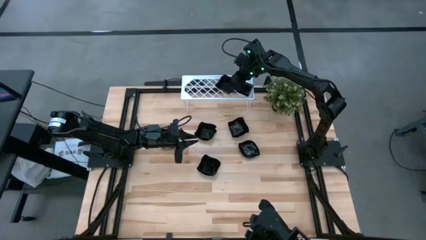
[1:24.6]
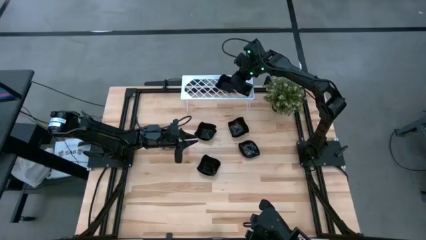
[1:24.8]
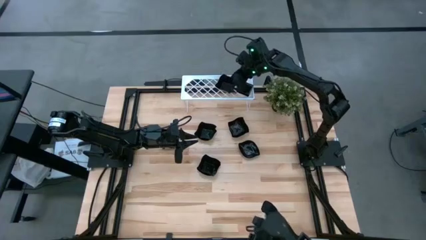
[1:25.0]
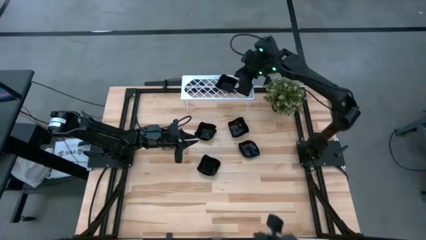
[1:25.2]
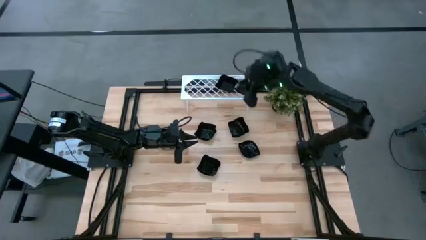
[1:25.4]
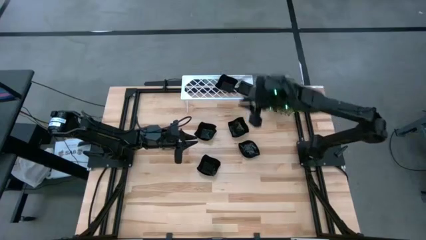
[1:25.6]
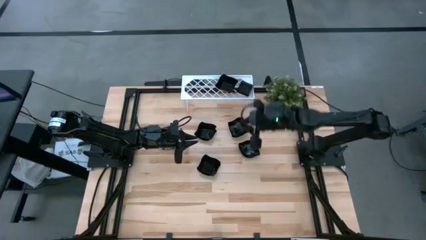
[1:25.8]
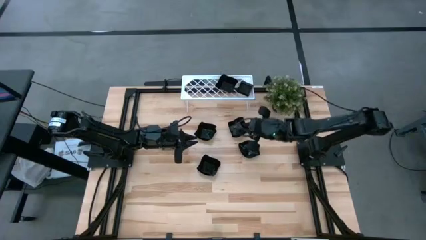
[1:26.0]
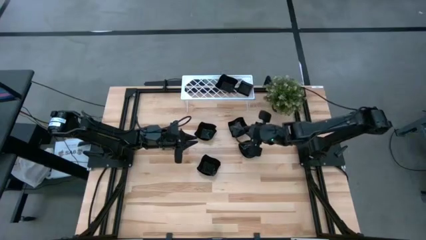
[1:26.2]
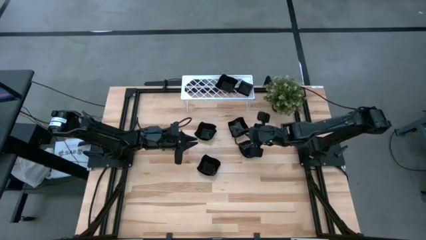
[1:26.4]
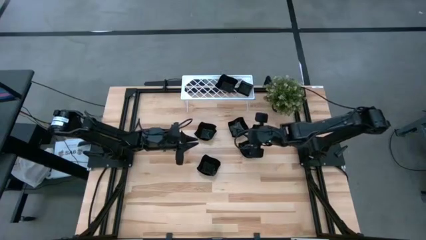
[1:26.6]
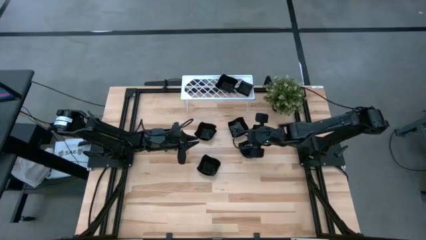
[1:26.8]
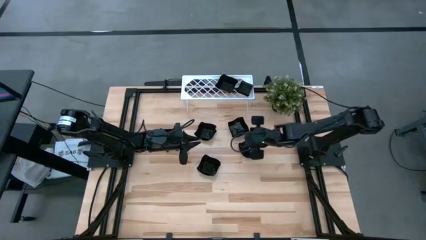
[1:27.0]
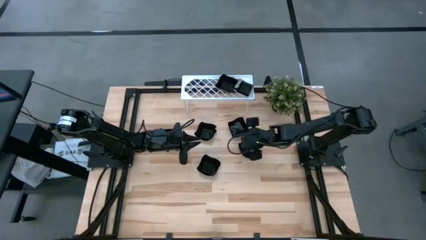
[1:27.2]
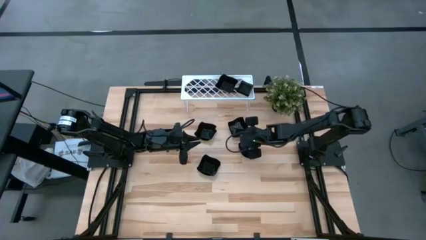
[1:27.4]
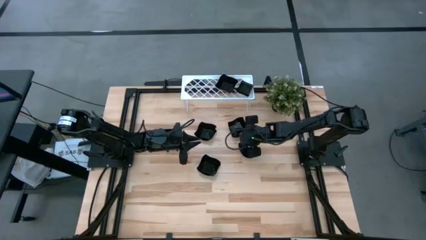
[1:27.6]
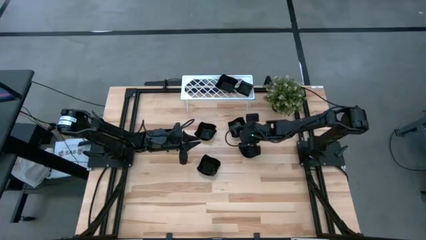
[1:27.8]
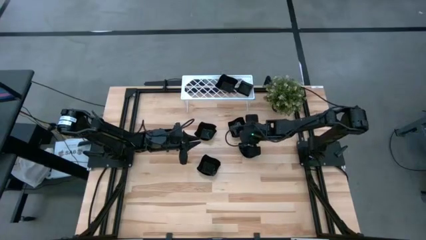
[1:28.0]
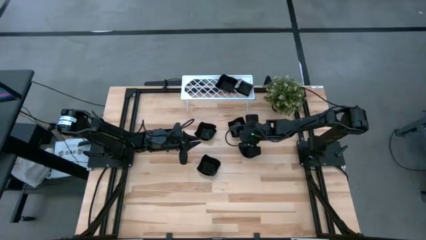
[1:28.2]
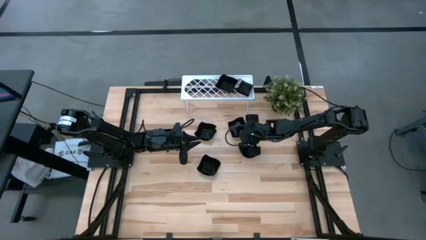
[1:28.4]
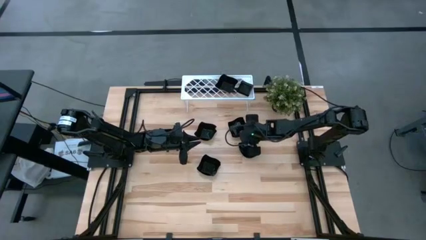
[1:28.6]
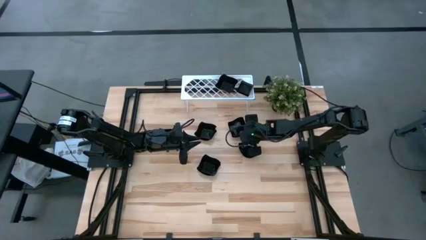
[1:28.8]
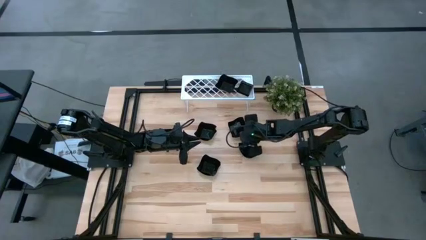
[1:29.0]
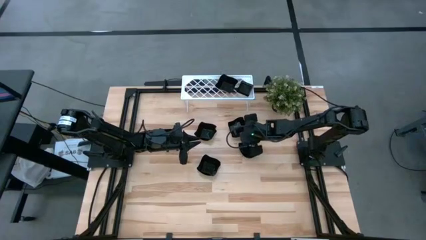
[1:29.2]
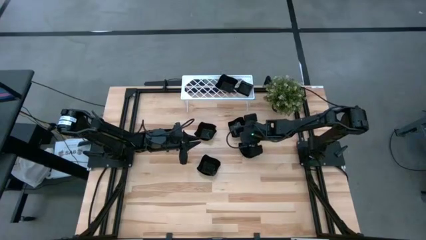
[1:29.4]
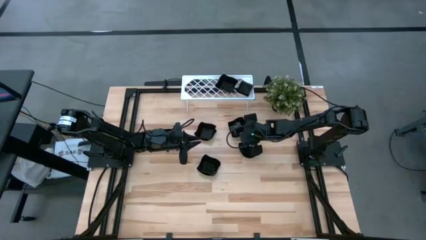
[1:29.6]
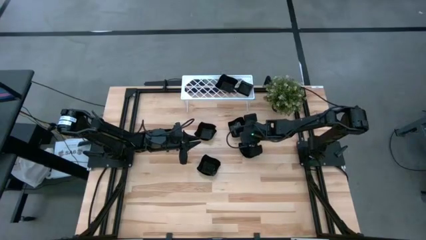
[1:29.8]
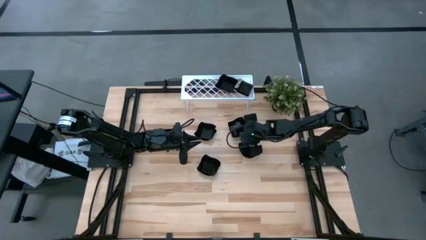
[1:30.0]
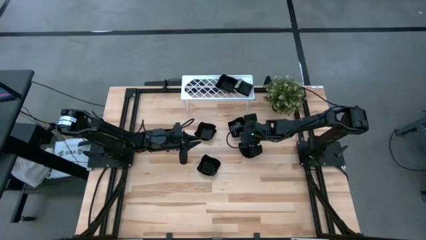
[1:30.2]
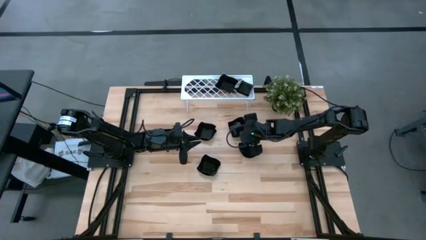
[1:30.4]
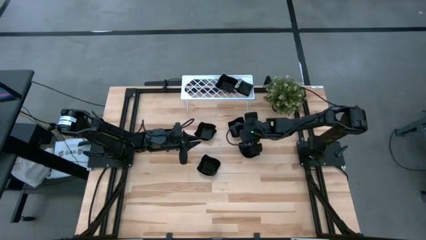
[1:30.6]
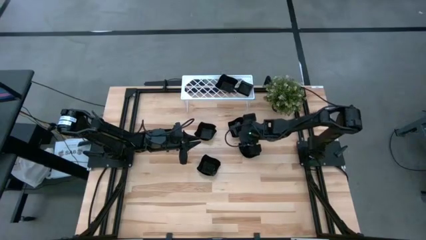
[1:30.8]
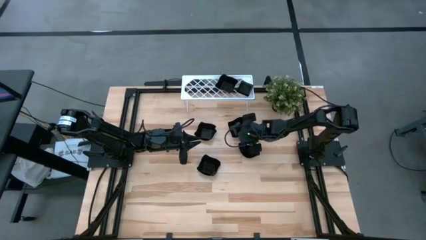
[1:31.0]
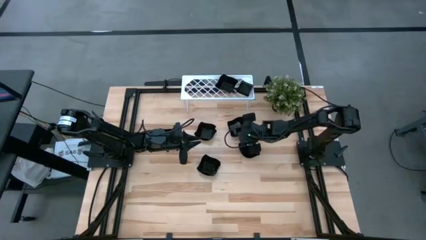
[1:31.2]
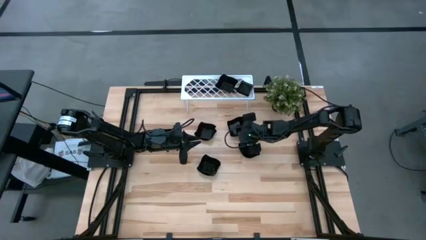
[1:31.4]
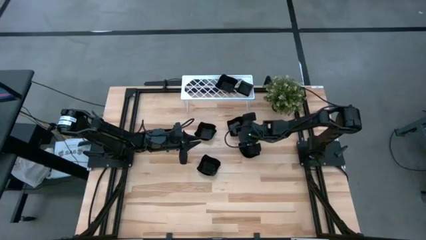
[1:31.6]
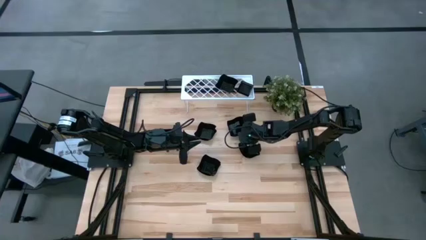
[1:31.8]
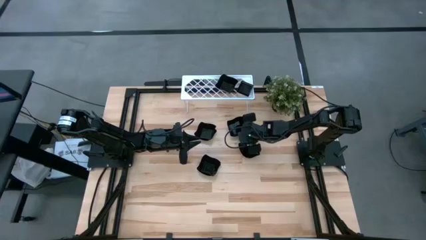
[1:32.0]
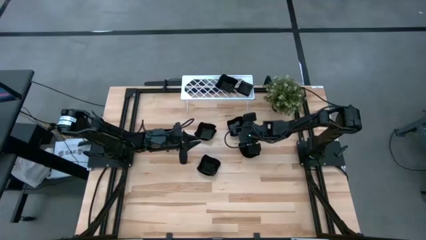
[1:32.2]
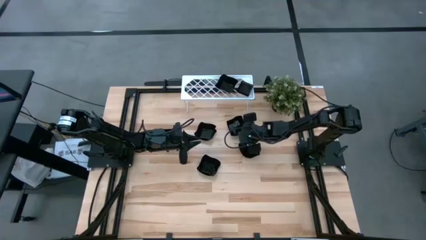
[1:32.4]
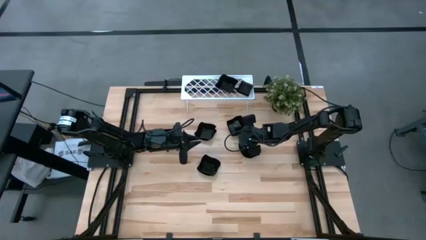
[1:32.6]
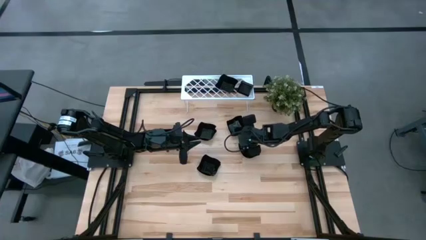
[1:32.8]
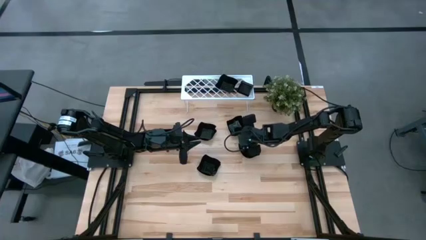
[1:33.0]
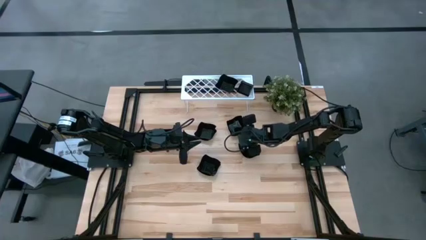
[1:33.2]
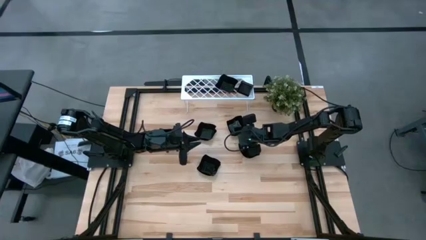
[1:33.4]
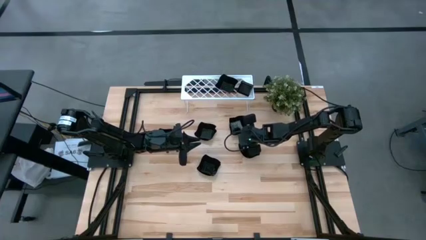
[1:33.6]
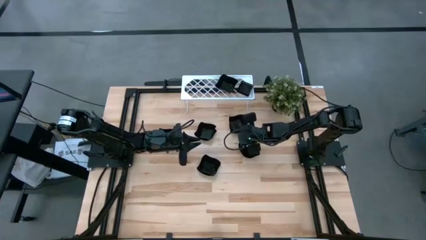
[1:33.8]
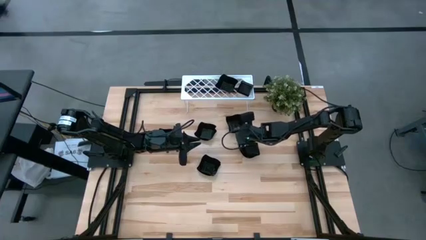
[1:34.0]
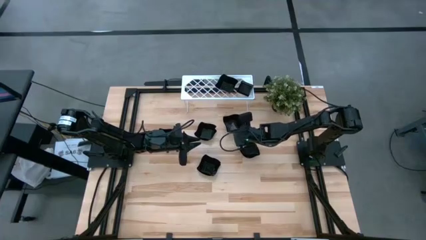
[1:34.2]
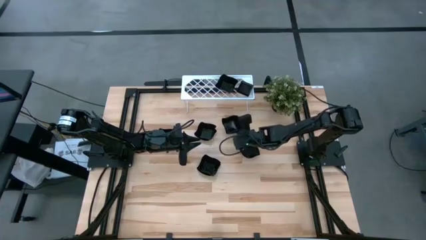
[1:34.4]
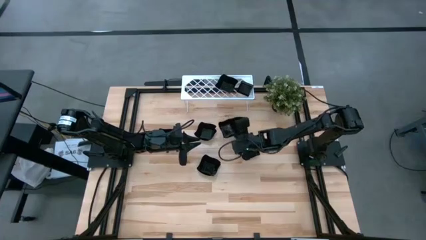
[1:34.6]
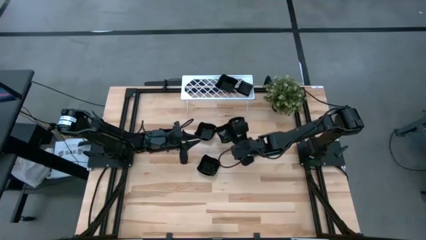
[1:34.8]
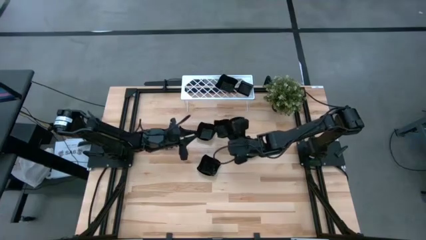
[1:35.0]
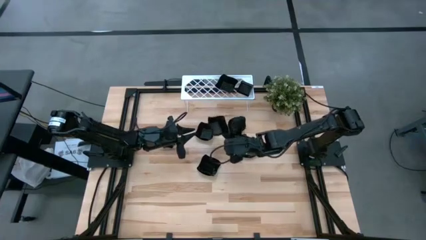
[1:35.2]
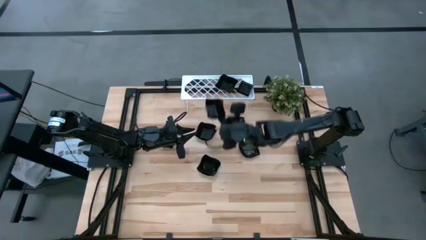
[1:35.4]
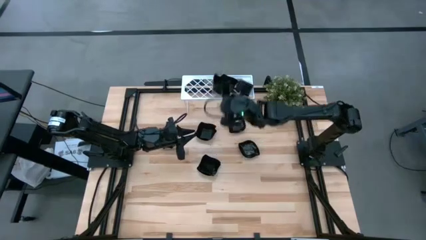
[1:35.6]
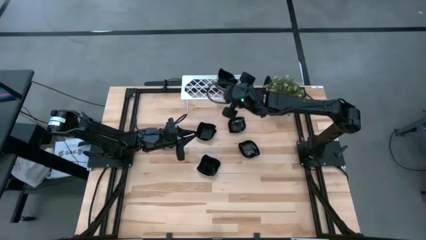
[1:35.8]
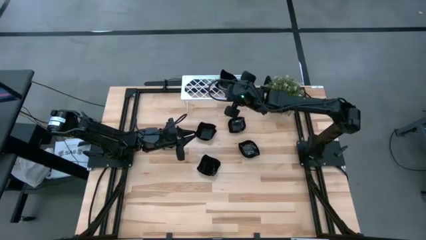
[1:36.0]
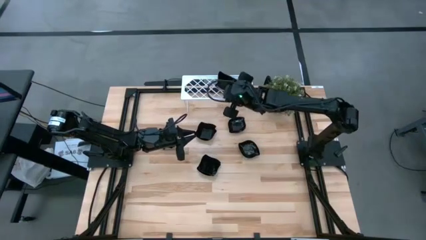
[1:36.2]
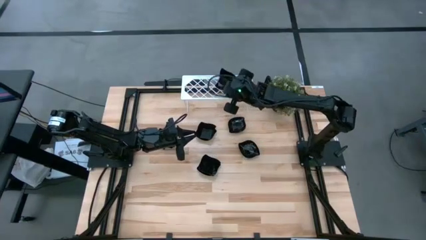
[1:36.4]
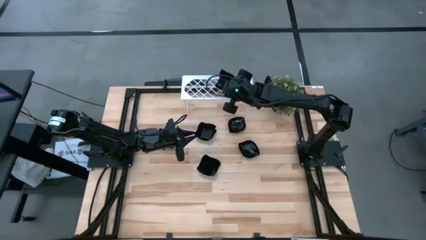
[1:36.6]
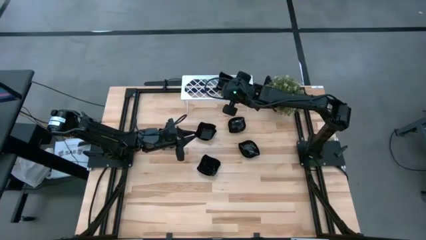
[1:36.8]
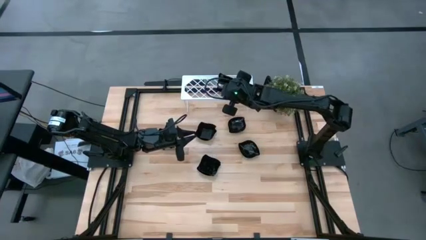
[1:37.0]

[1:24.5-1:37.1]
Task: Pick & Place Mini shaped plates
Stack the black distorted square plate on top of the black distorted square plate on the shelf

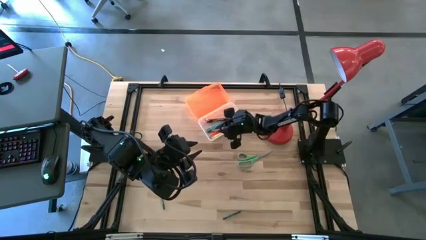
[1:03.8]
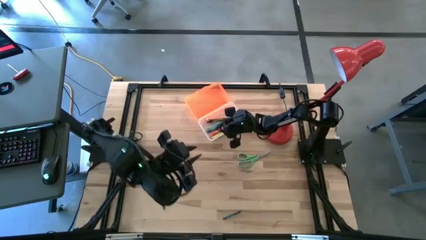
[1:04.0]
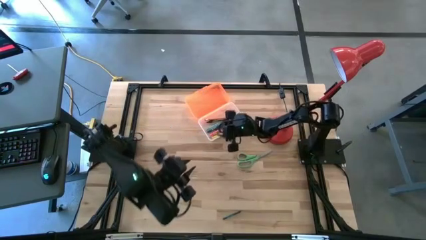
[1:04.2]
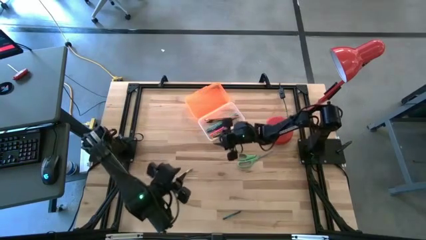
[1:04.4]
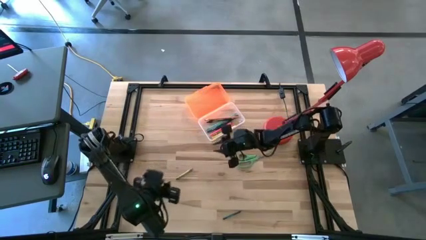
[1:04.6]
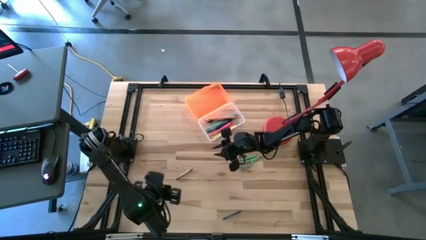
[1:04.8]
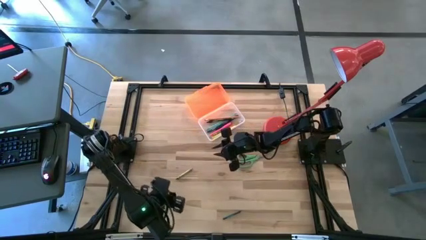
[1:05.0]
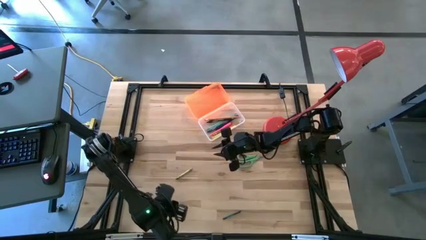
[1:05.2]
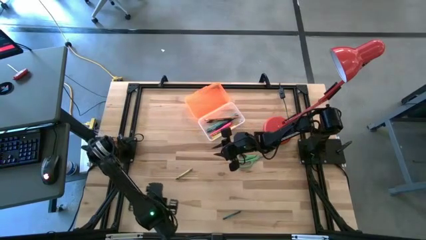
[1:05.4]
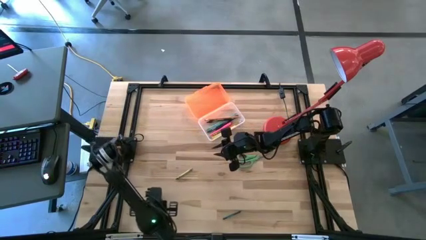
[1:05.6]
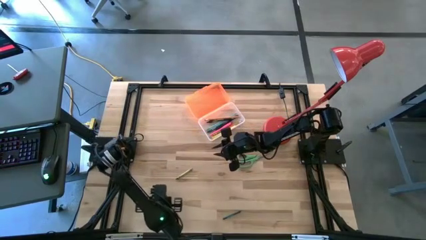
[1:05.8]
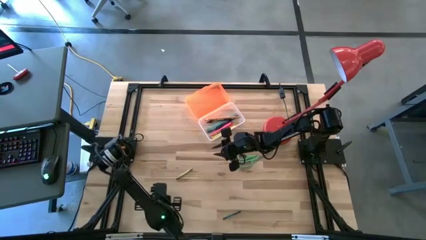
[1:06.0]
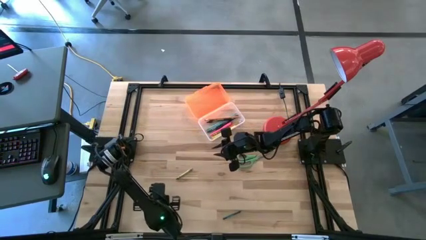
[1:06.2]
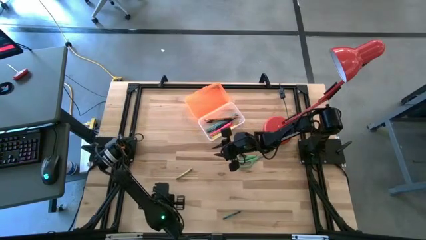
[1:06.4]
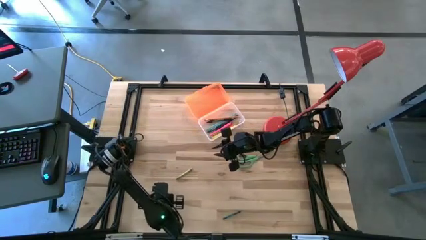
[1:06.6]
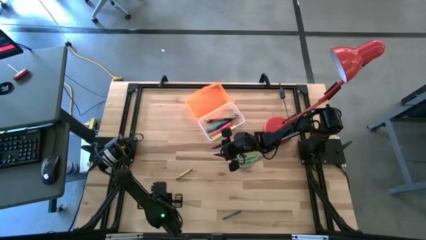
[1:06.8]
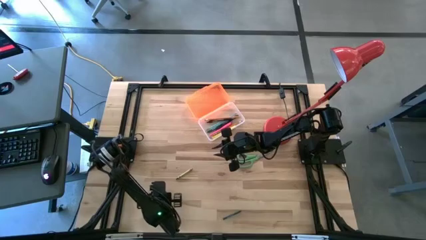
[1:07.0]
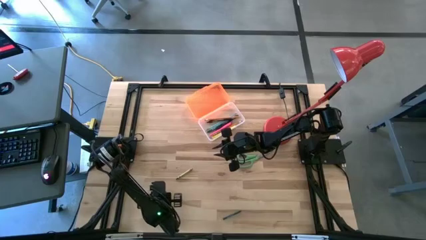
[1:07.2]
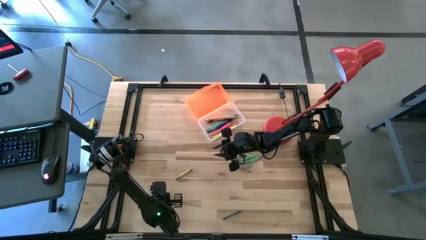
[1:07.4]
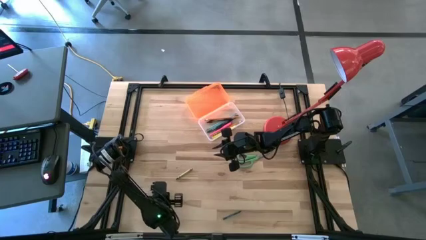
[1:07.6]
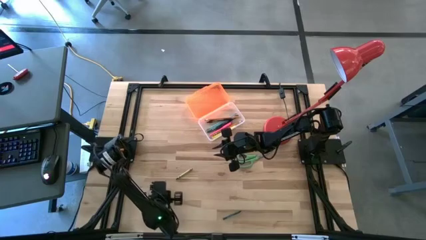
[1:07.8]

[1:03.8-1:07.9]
Task: Pick & place school supplies into a supply box
Put the dark green crayon into the orange supply box

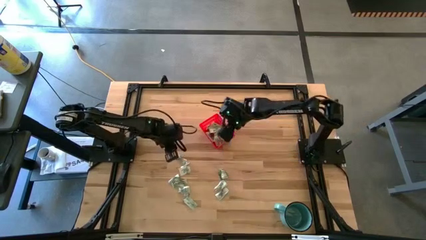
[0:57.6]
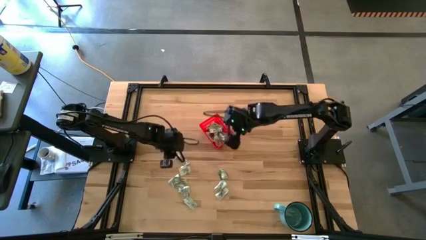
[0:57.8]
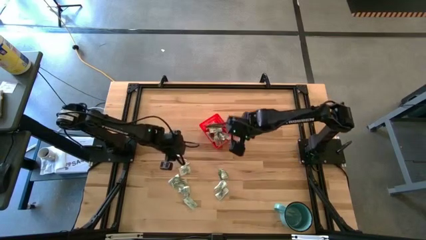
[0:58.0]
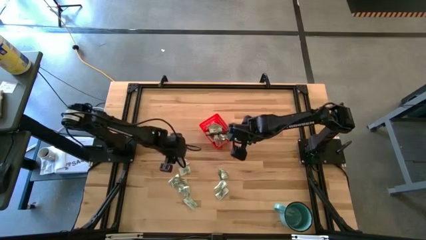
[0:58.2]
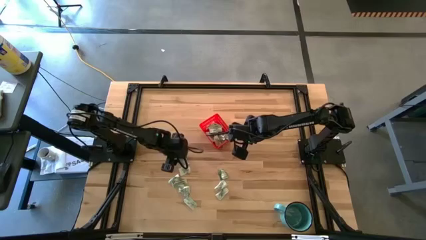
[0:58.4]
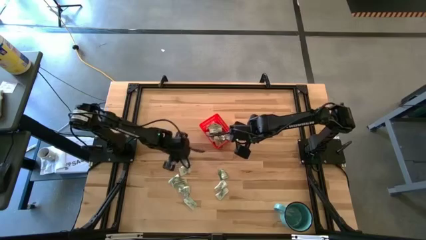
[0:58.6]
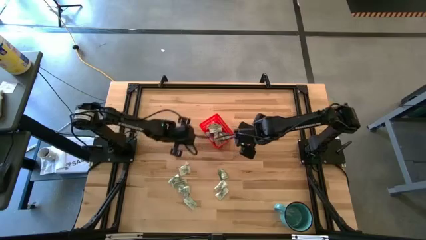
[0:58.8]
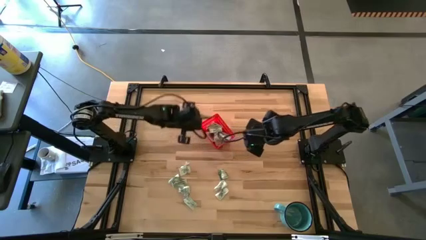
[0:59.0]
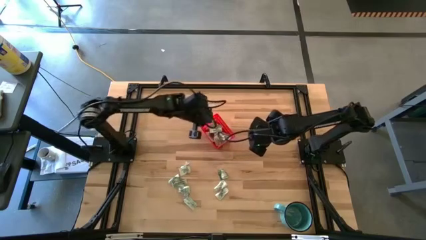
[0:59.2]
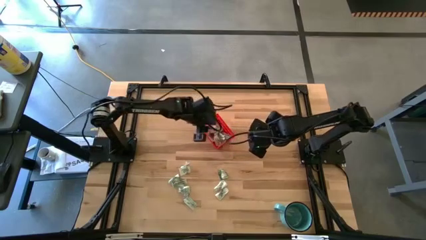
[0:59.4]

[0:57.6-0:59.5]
Task: Pick and place Stevia / Truvia into bins
Put the stevia packet into the red basket
